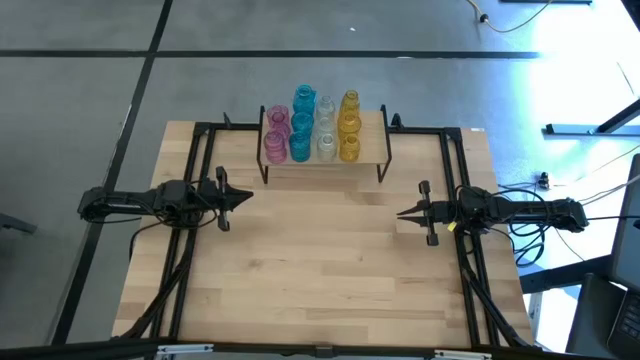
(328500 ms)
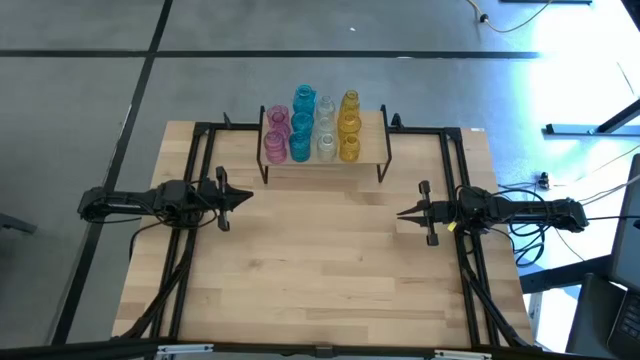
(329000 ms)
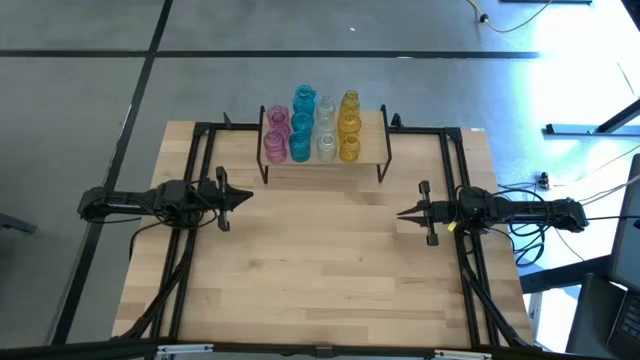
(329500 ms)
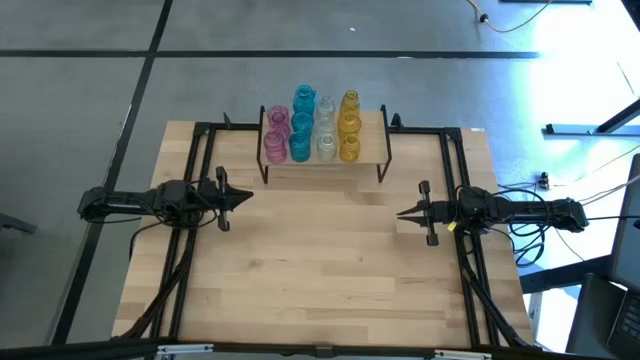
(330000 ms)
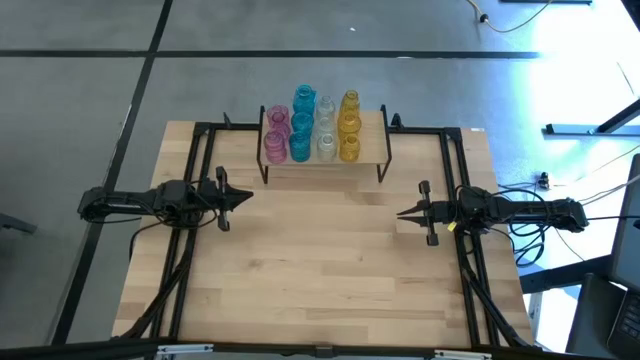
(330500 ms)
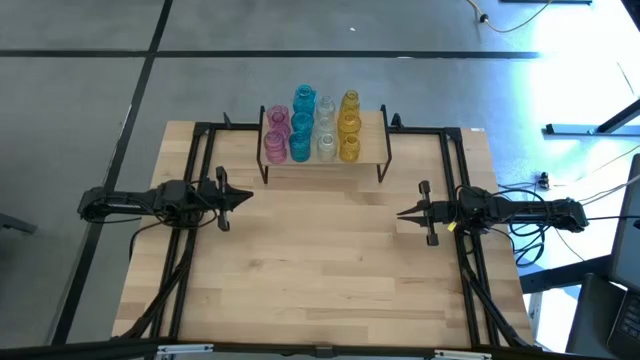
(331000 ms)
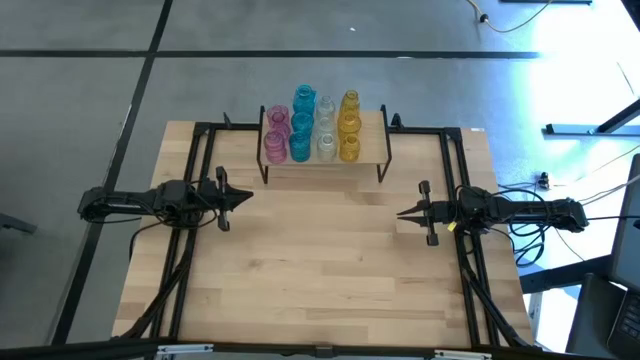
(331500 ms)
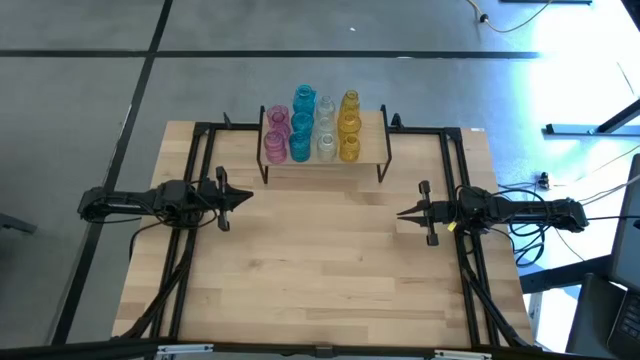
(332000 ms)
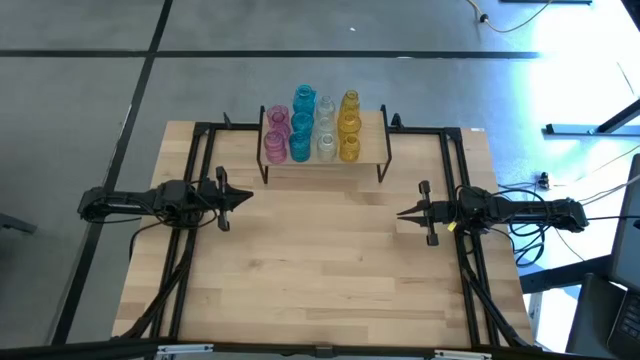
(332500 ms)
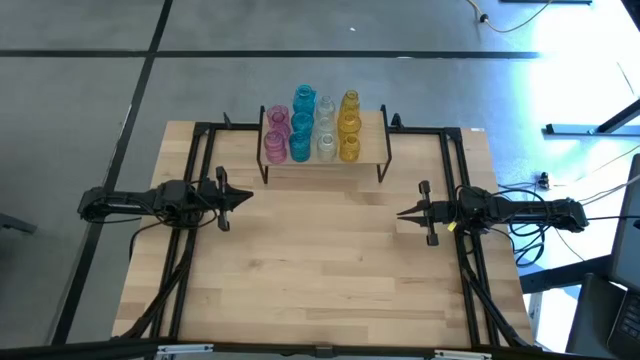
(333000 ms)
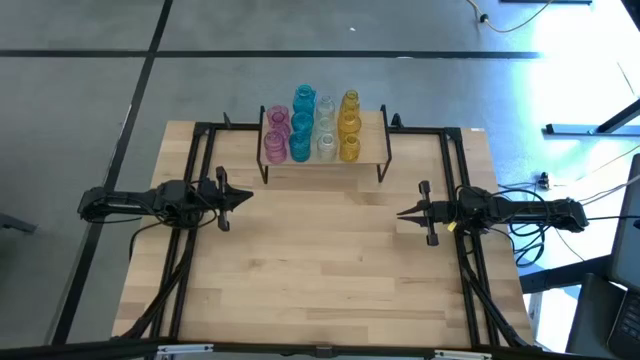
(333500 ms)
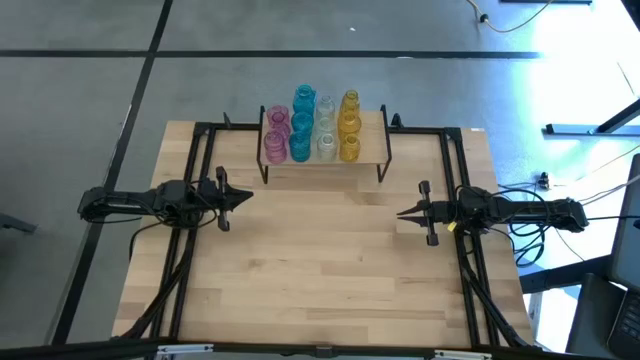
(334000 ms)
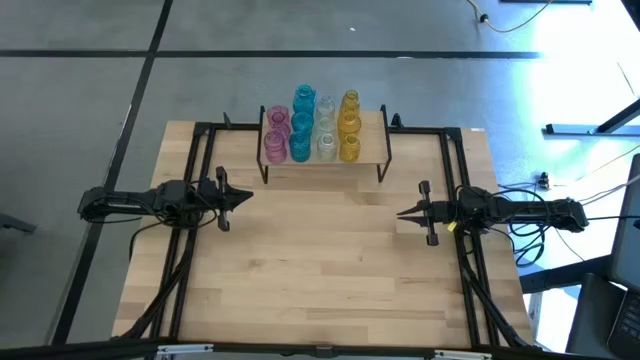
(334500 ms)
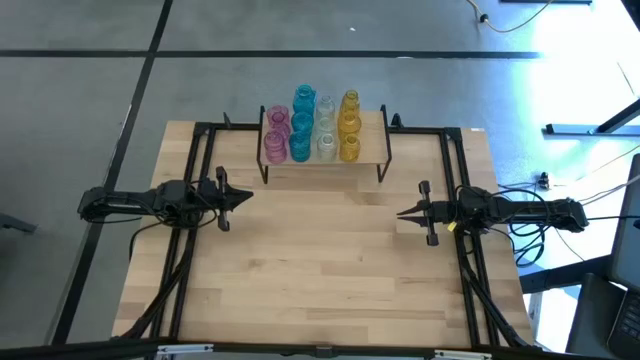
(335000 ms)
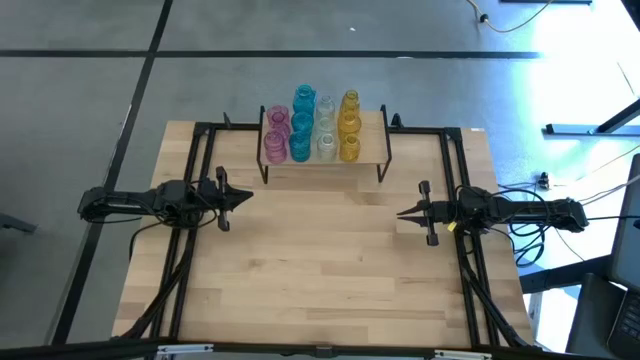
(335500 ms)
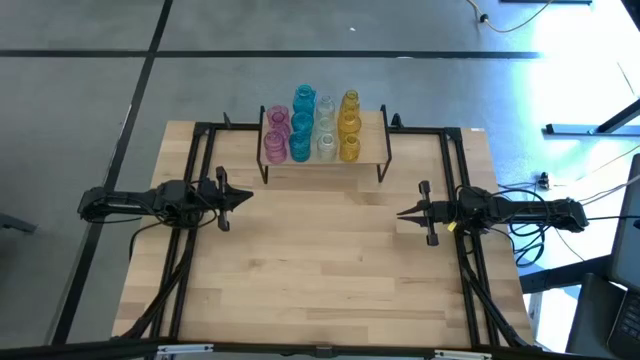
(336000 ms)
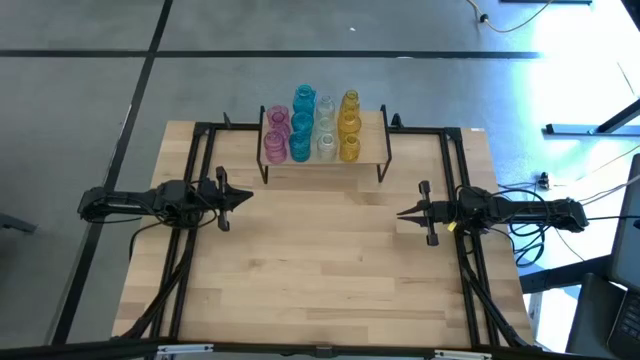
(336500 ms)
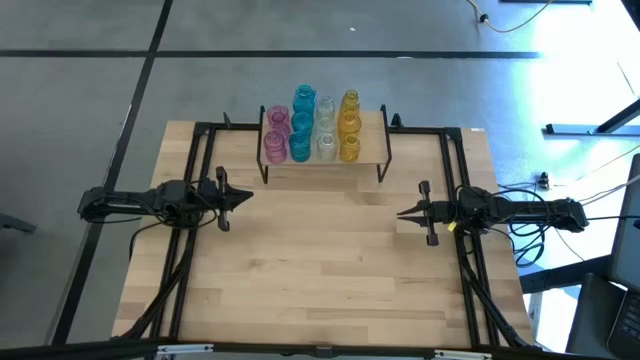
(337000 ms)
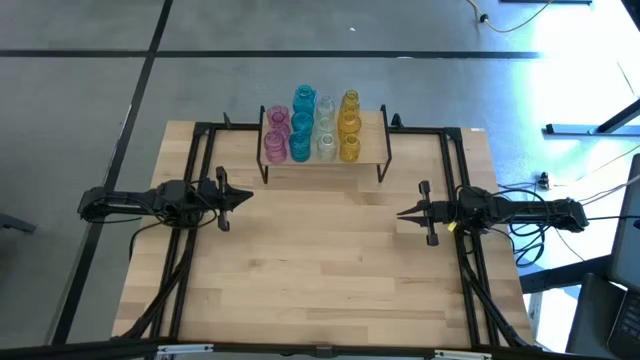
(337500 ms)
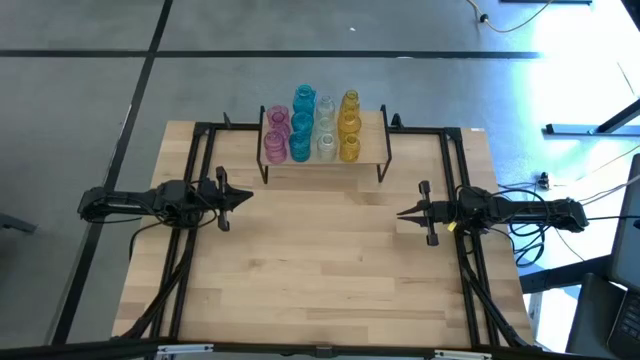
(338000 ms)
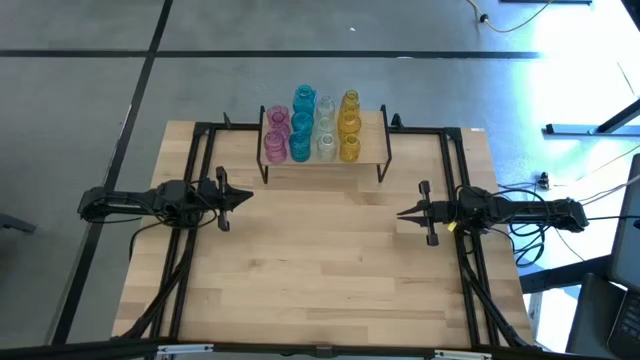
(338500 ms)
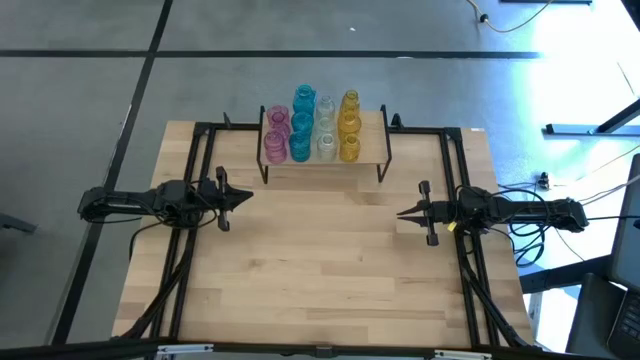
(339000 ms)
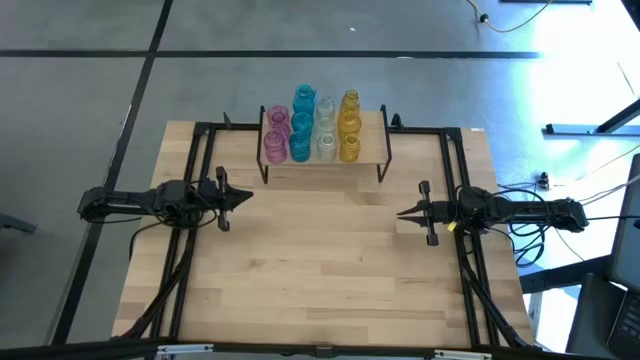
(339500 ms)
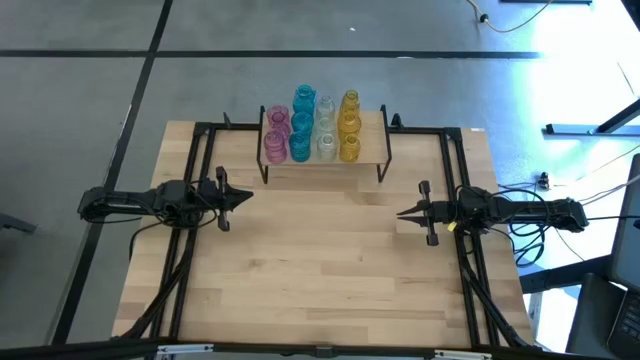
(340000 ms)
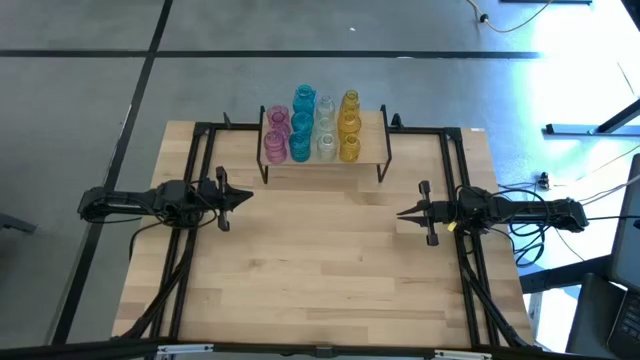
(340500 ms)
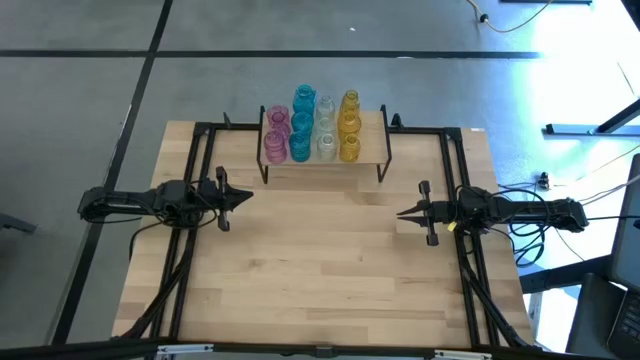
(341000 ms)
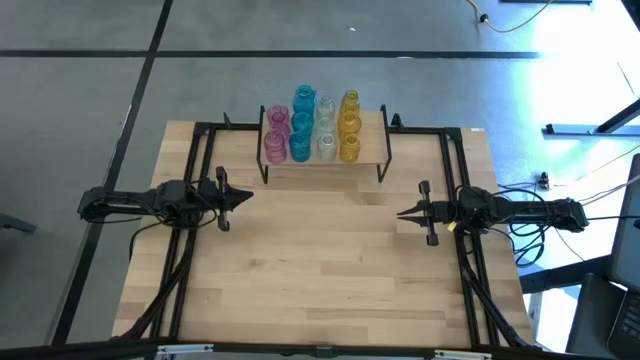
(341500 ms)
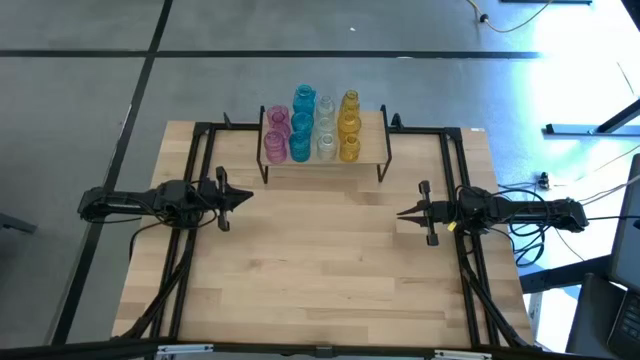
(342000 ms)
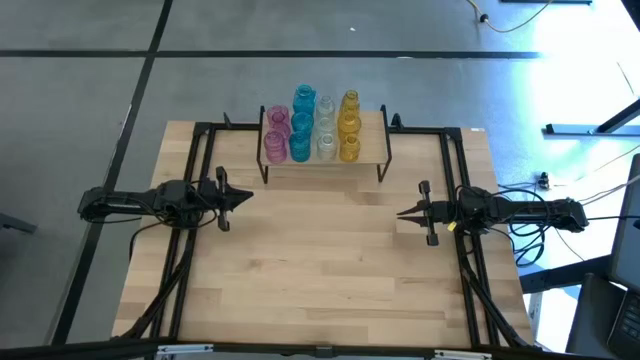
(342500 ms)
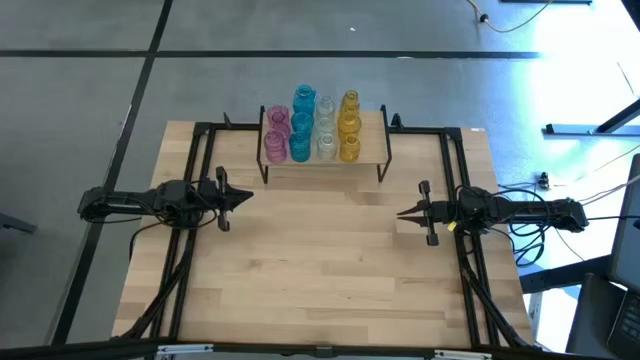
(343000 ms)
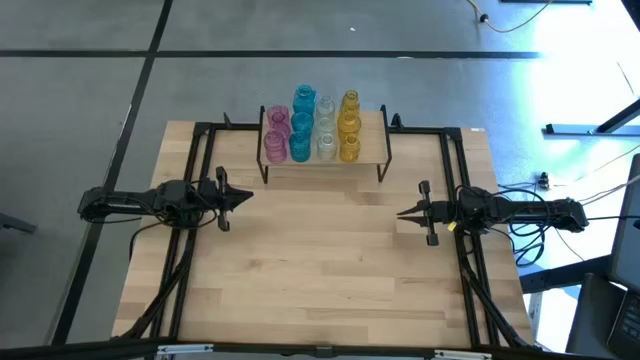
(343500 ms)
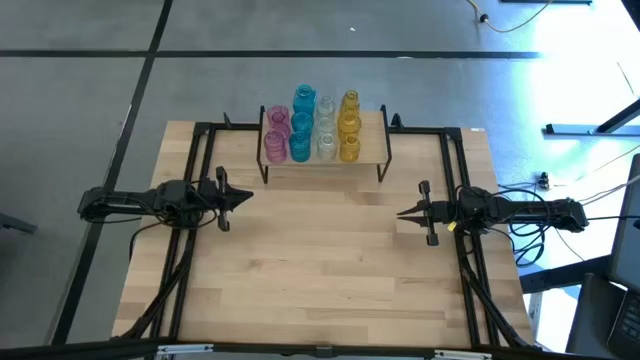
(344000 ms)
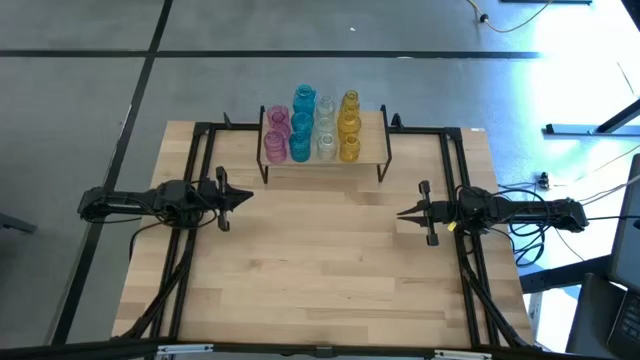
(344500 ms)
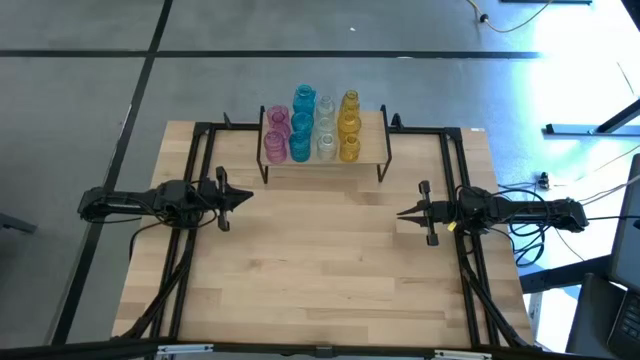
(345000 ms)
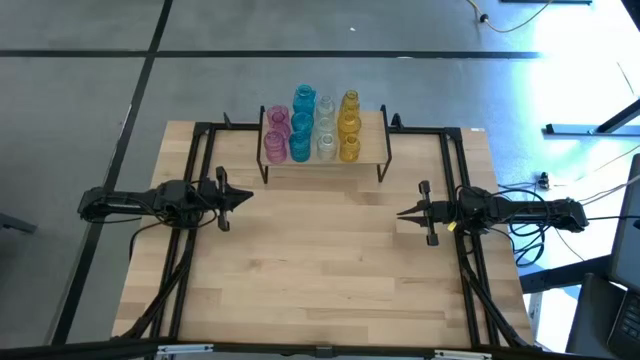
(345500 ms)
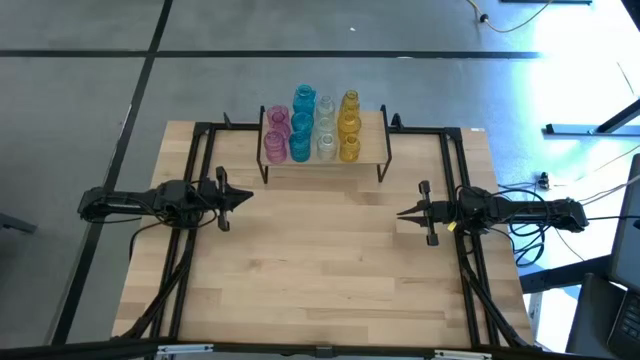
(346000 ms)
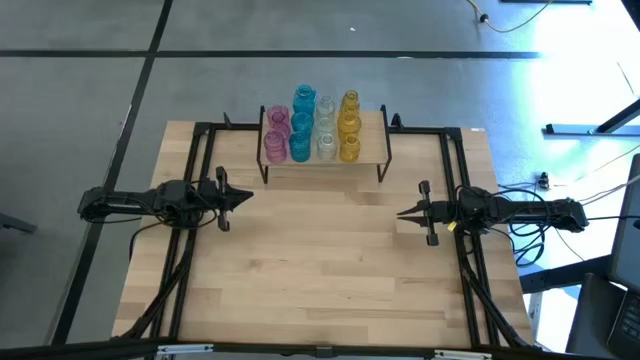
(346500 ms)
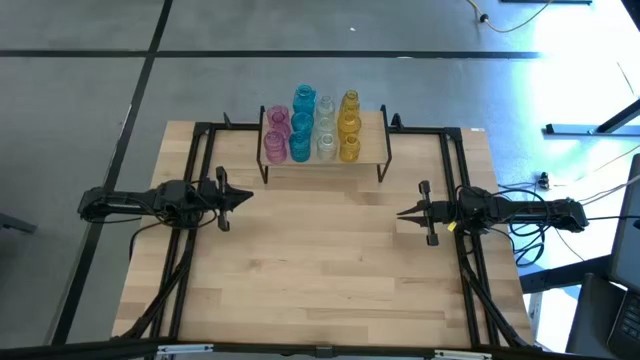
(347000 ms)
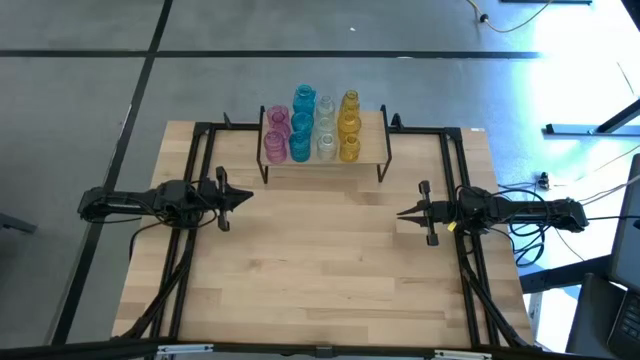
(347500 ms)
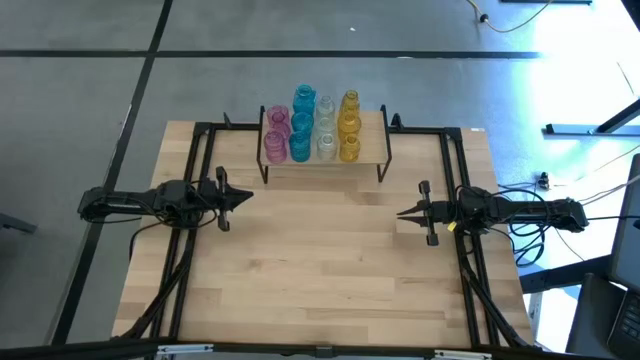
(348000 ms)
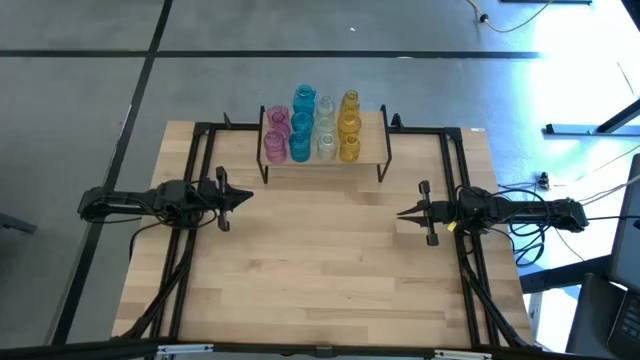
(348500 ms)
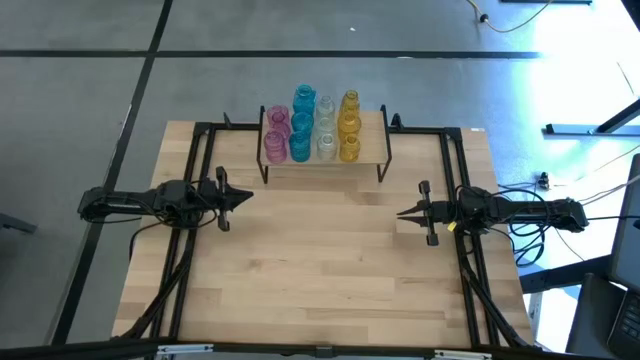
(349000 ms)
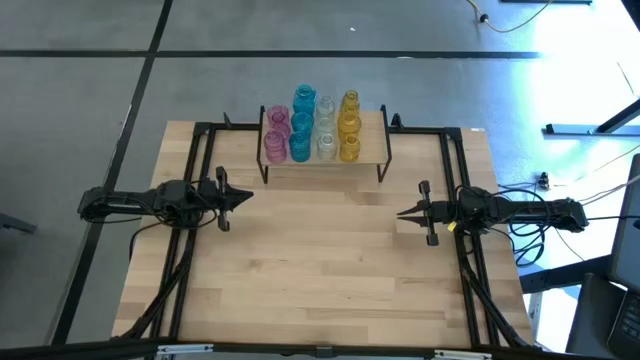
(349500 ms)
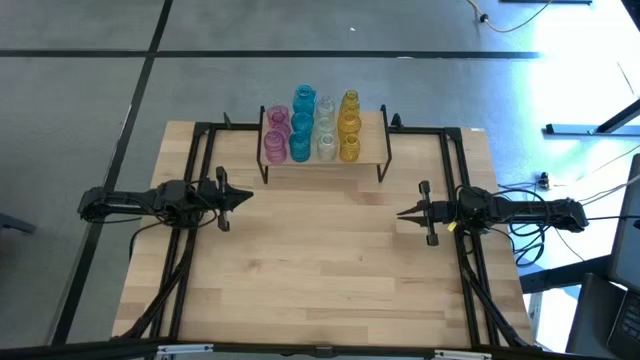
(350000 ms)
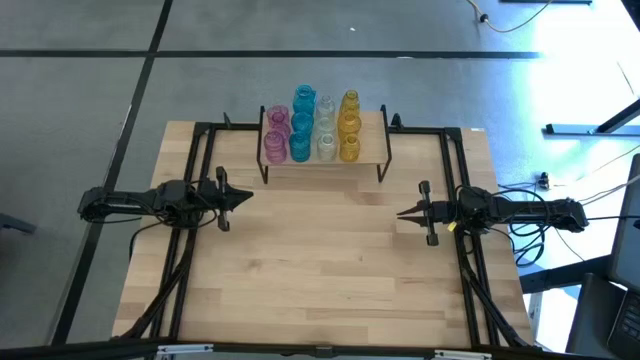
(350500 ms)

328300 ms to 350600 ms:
Task: sort vases onto shelf
Return to Home Position
